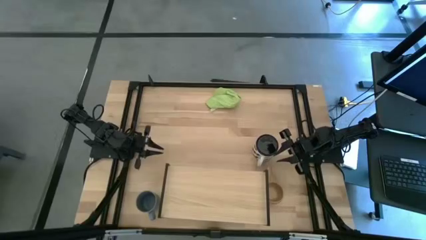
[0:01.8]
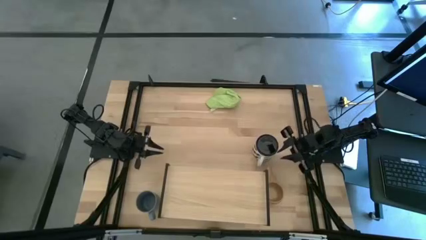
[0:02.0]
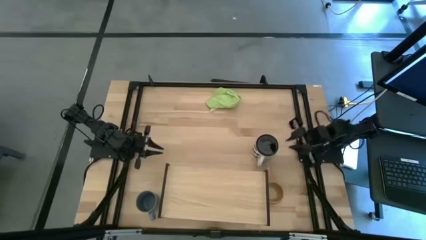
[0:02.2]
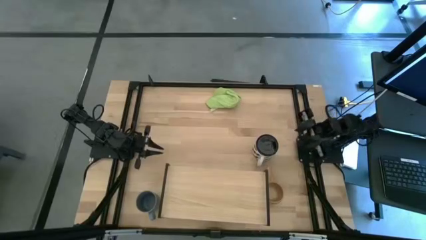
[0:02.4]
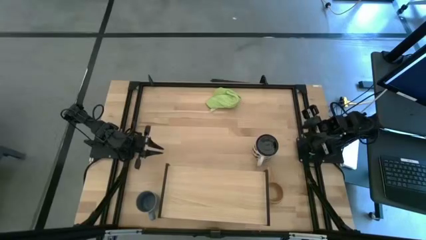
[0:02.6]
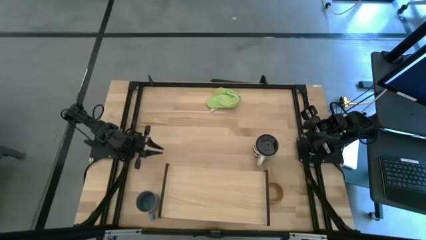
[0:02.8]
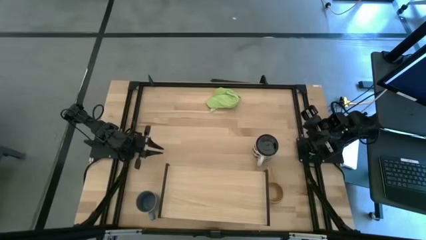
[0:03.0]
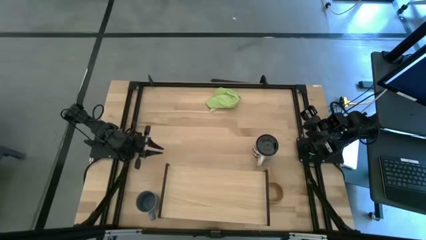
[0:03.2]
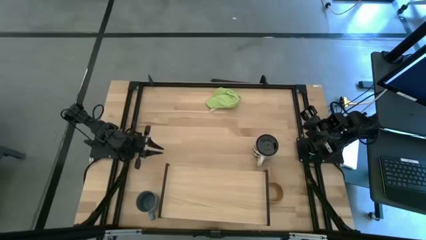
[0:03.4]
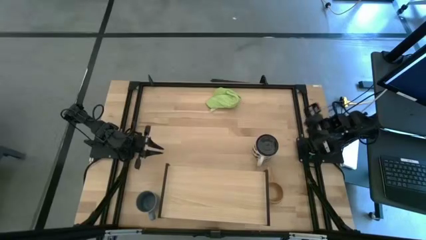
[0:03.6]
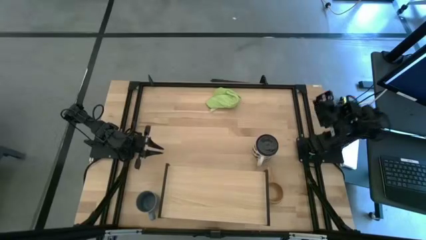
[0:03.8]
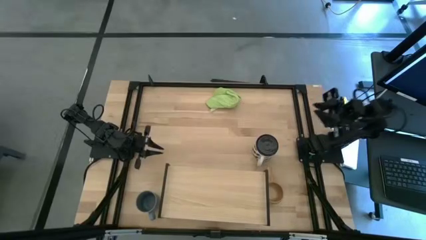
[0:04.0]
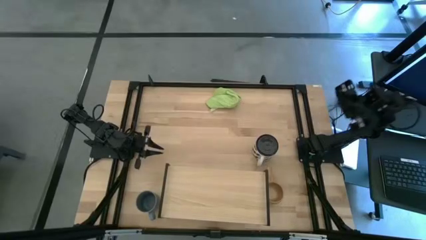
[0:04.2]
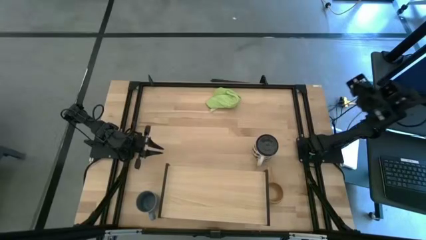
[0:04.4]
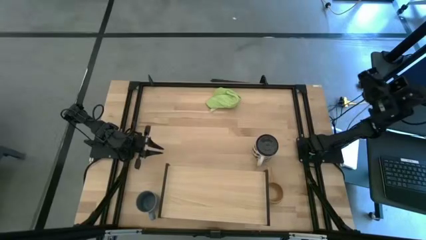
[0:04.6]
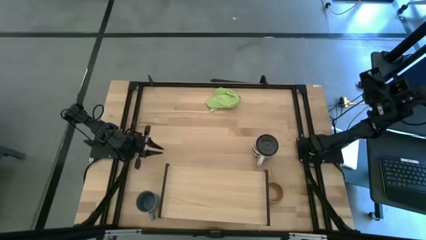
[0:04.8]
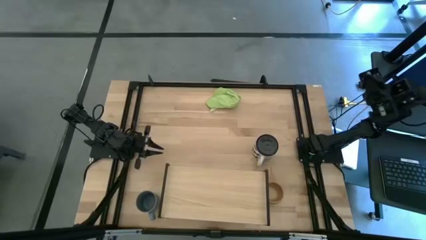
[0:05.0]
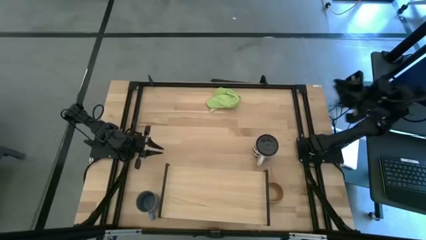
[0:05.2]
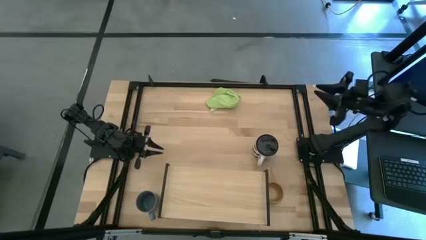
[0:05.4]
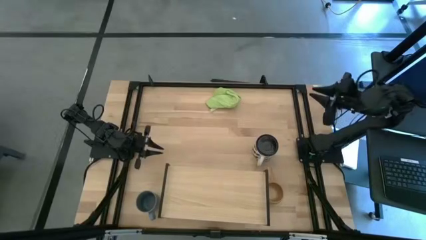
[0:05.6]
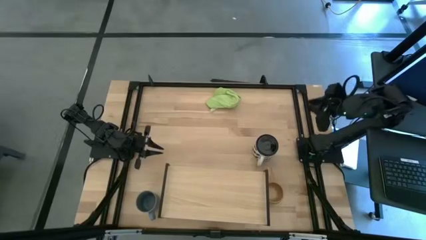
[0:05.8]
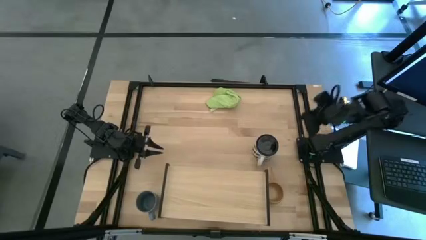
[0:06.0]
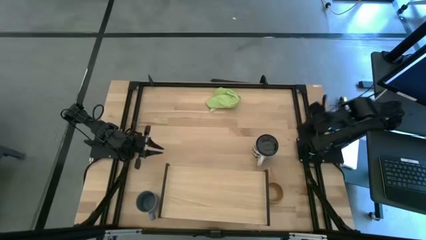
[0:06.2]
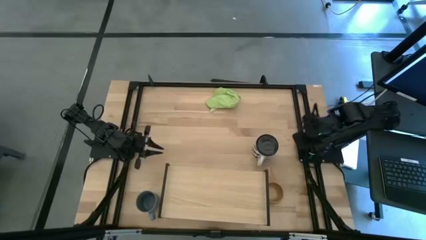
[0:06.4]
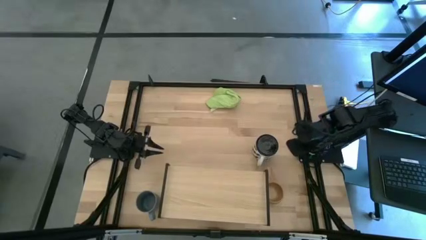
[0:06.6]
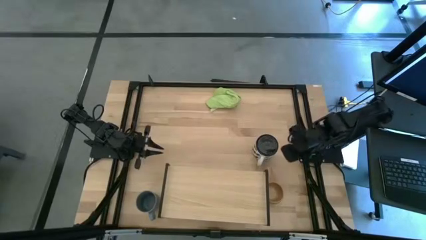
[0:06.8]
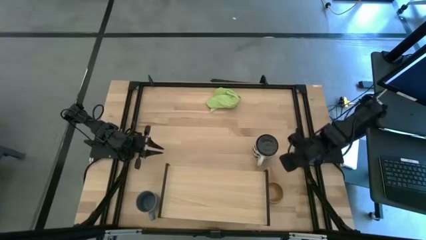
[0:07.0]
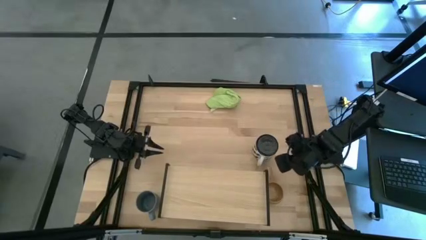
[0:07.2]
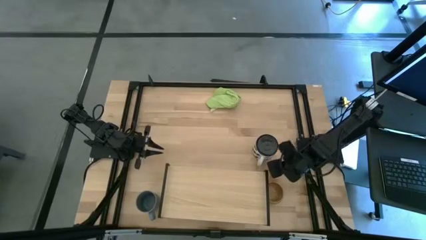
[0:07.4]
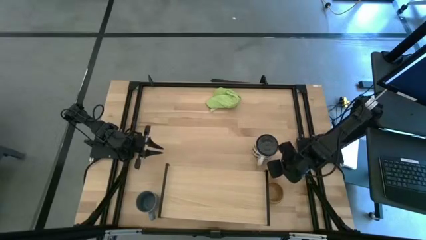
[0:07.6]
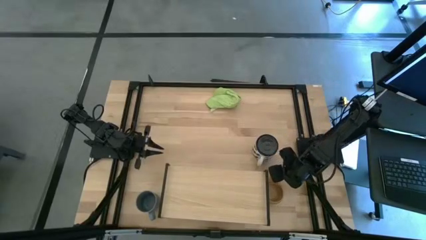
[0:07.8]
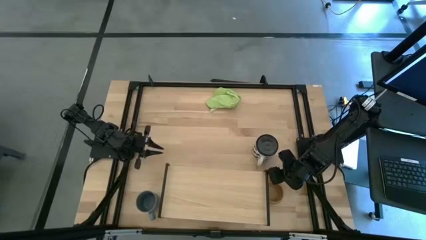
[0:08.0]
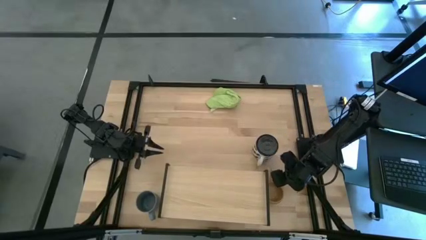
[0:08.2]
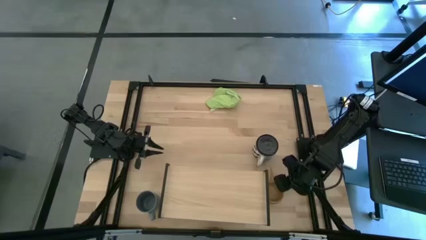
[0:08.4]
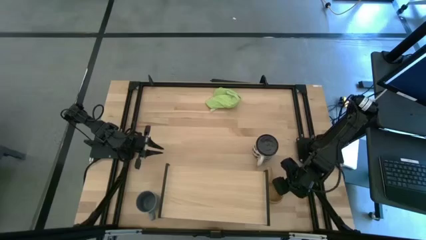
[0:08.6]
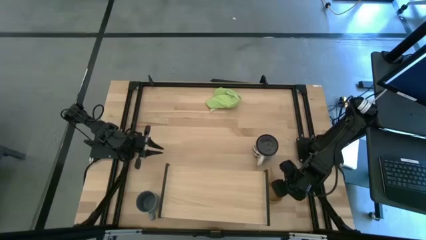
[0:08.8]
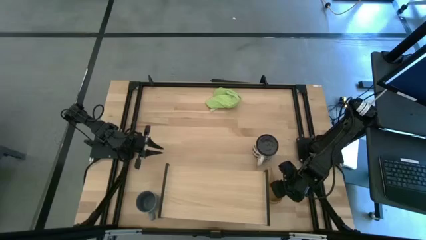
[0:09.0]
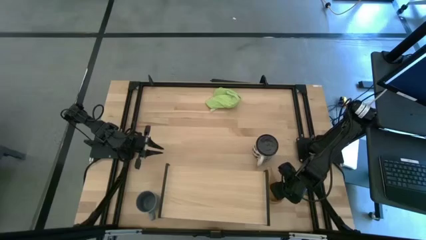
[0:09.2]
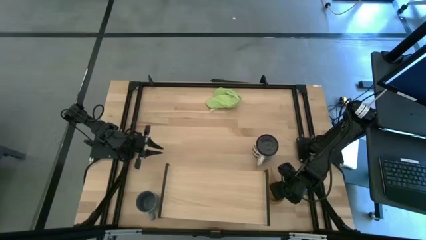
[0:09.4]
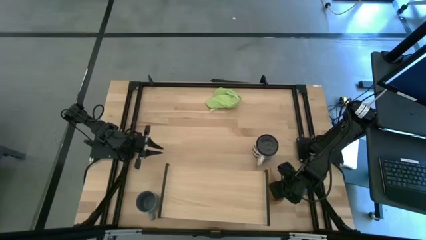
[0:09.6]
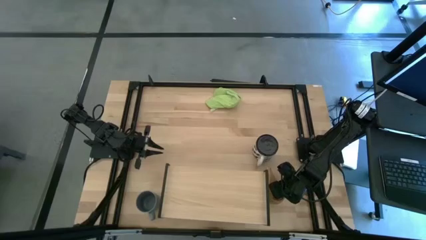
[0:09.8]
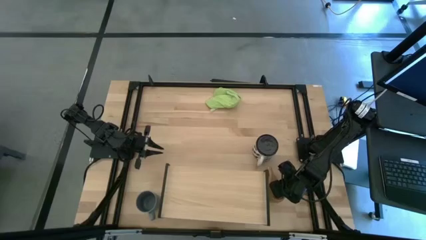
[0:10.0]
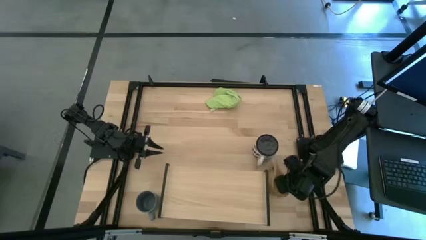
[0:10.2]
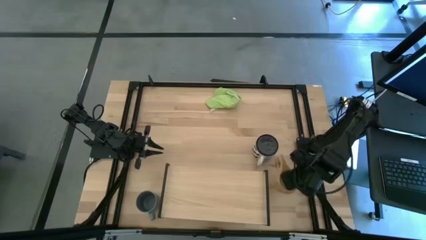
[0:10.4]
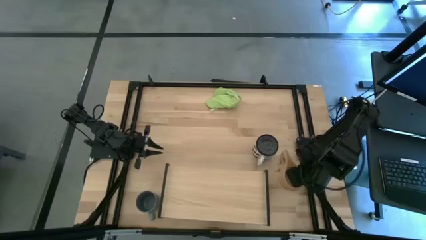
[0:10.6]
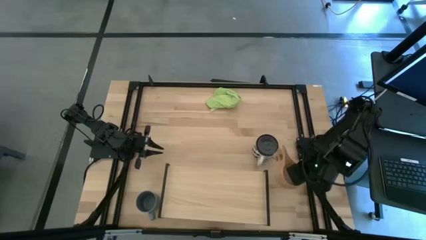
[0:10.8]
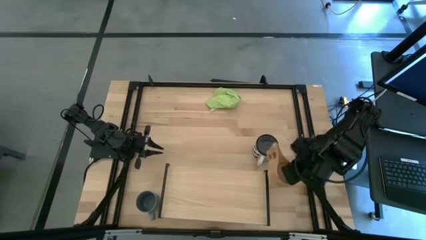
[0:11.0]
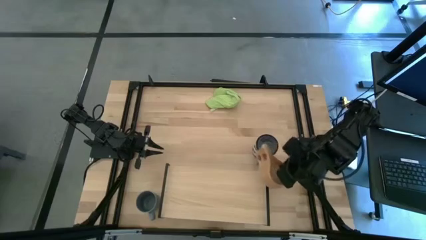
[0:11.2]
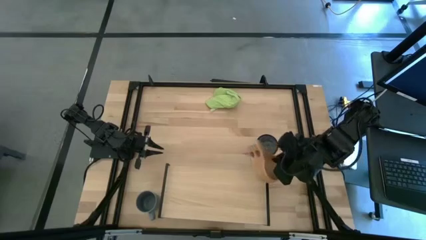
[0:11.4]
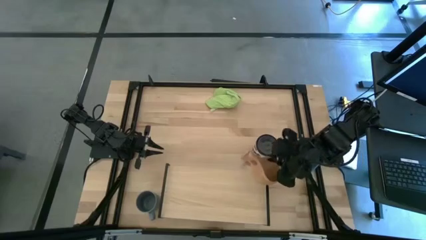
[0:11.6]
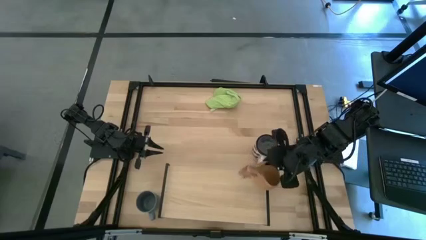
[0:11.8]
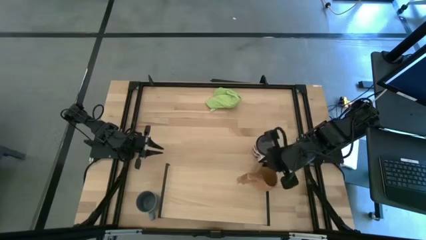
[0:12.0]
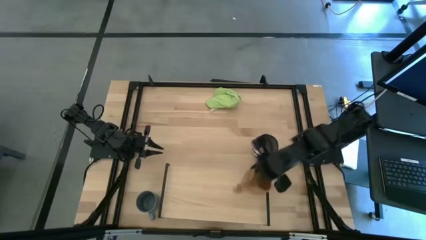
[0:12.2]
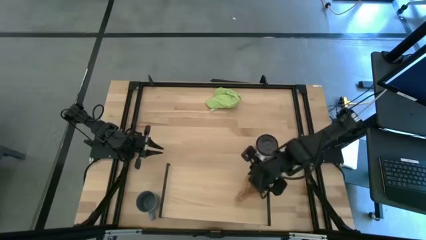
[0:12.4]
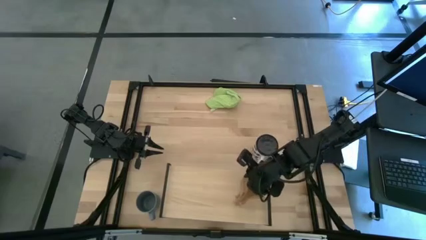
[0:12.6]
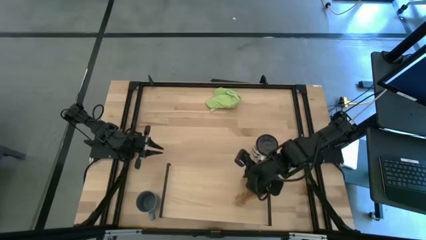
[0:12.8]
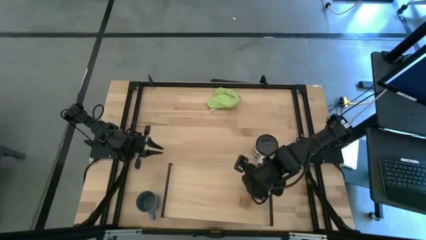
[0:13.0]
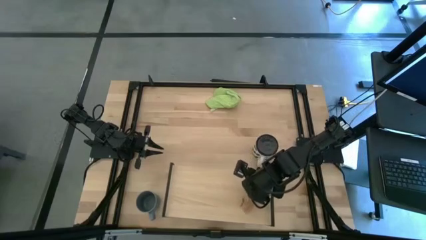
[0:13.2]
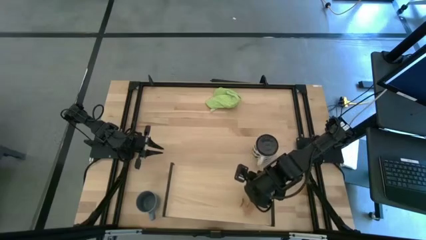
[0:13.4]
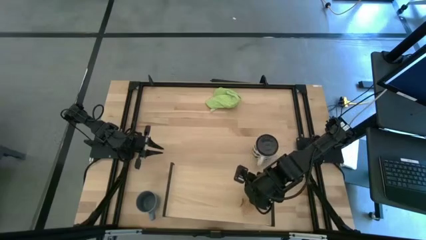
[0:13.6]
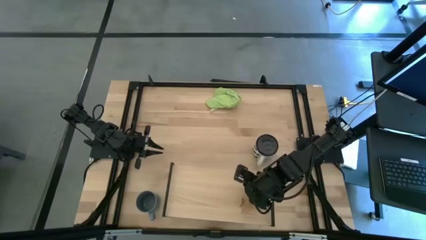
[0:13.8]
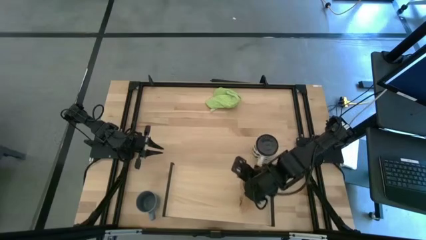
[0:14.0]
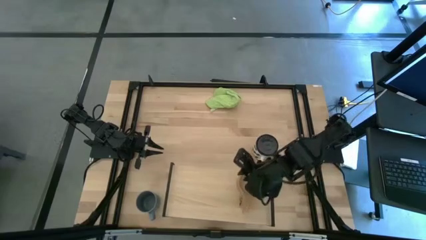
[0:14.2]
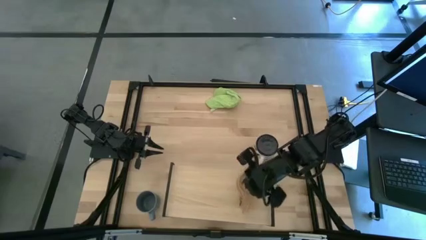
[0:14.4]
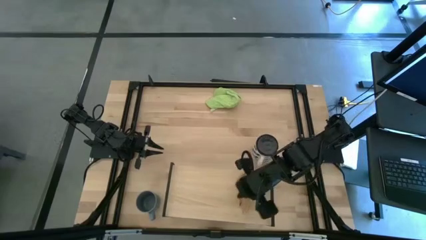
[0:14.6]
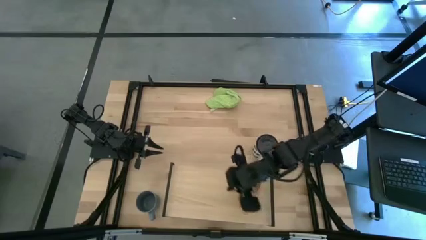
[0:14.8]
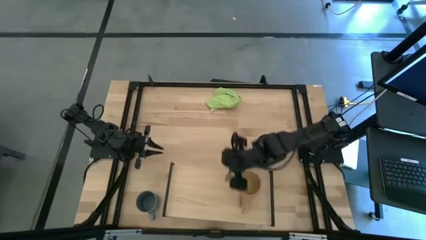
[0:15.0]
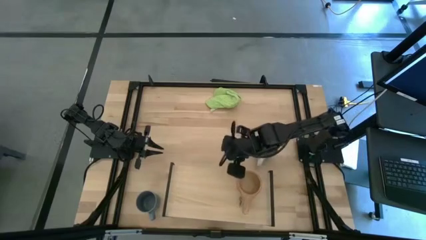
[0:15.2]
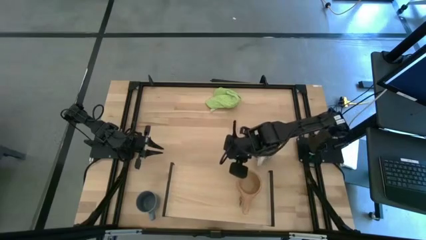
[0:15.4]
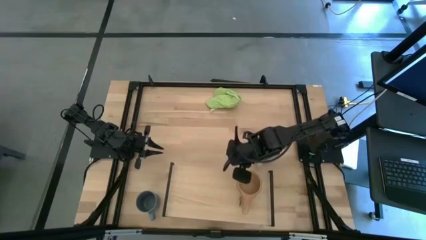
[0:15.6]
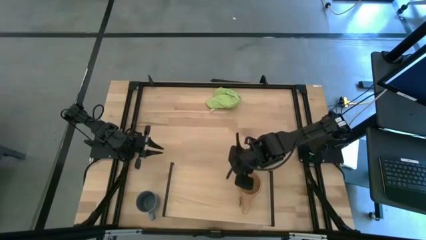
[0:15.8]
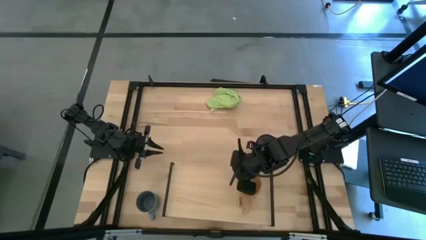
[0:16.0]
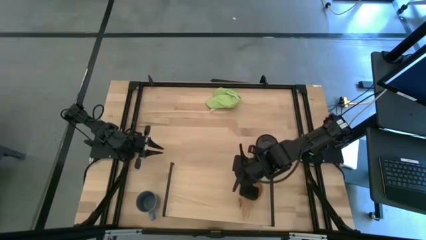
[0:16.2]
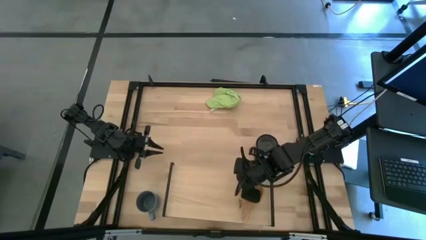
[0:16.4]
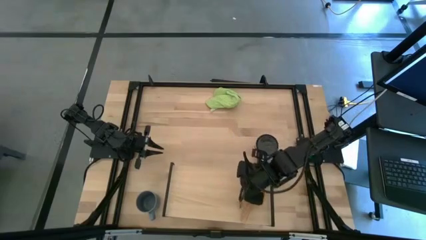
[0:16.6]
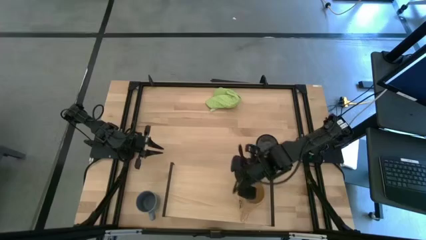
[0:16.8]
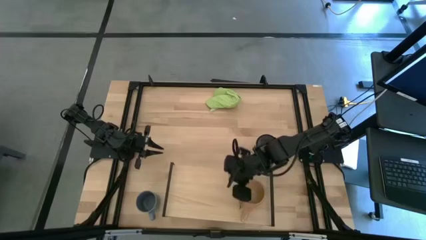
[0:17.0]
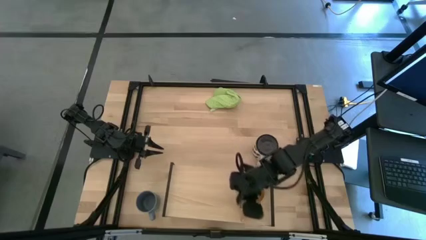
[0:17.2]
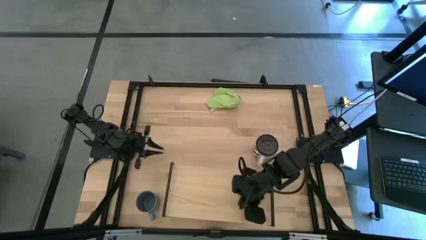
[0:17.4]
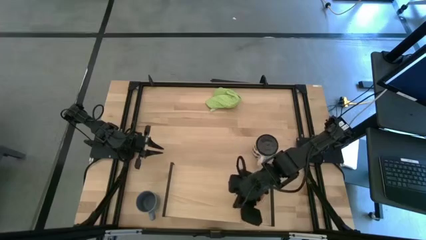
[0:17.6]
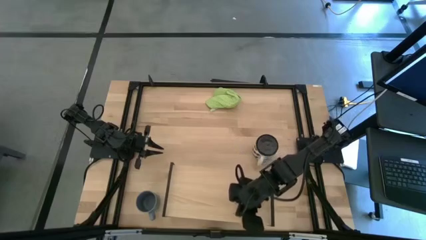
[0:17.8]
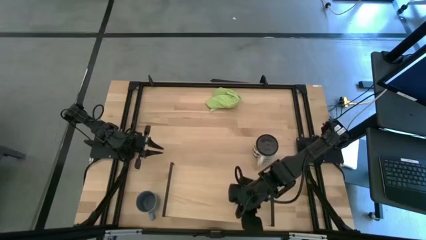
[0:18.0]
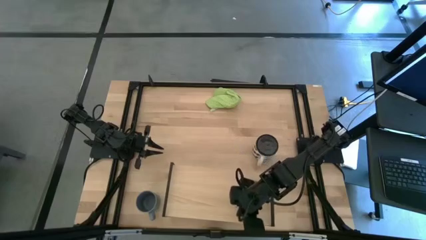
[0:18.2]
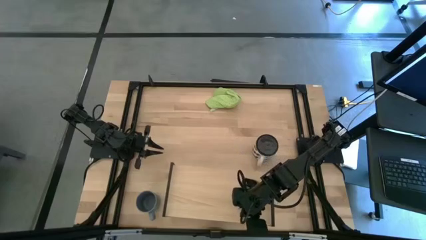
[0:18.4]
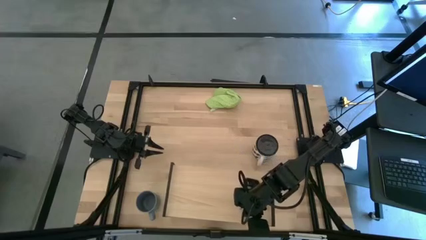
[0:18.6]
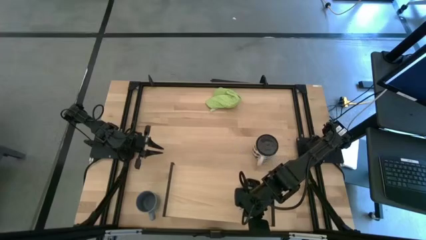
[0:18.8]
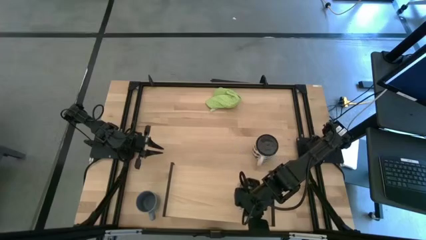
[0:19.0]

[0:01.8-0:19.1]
Task: Stack small to large cups/mugs on shelf
Put the brown mug on the shelf
